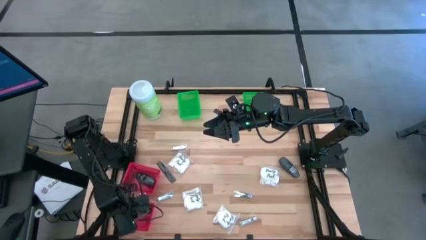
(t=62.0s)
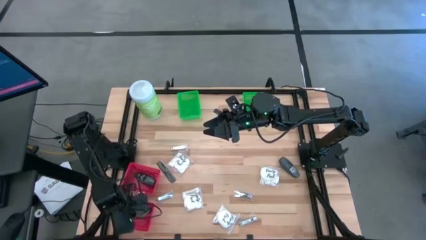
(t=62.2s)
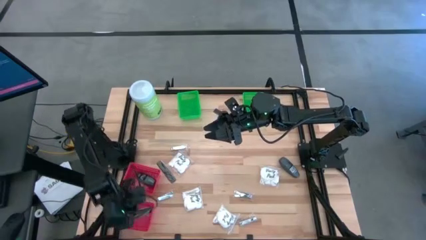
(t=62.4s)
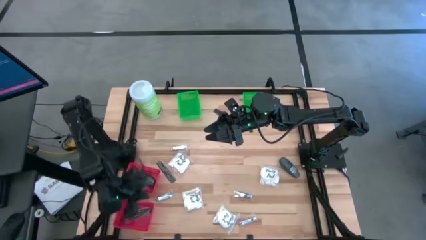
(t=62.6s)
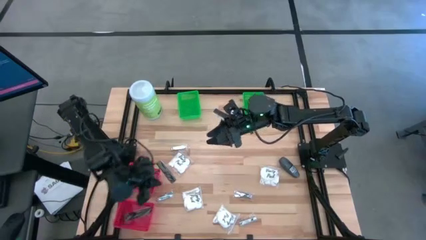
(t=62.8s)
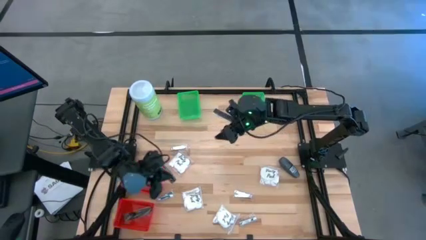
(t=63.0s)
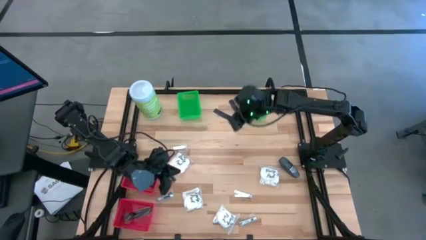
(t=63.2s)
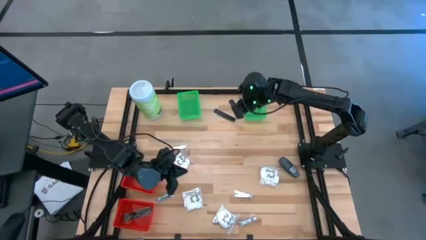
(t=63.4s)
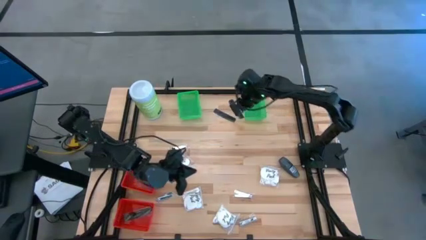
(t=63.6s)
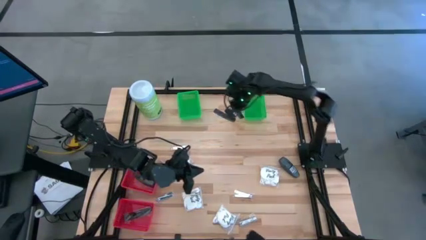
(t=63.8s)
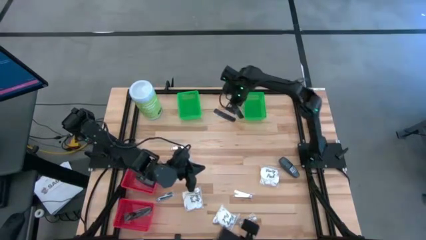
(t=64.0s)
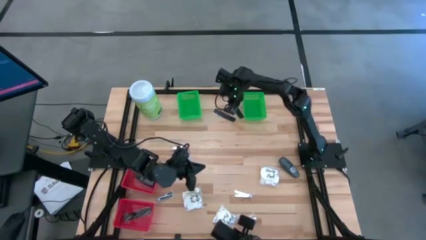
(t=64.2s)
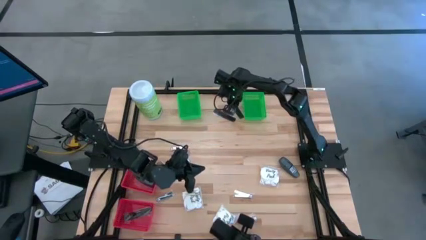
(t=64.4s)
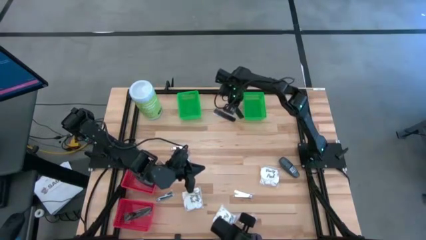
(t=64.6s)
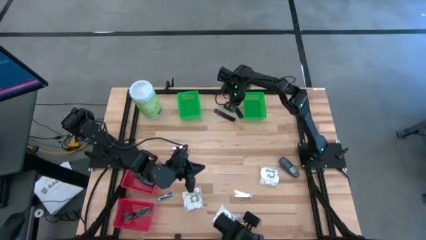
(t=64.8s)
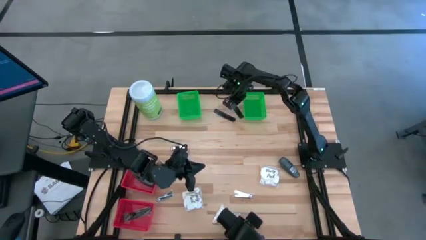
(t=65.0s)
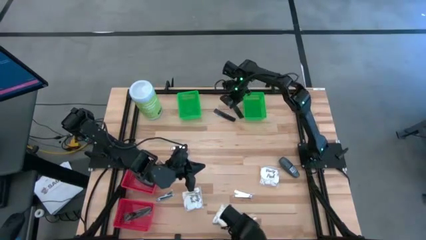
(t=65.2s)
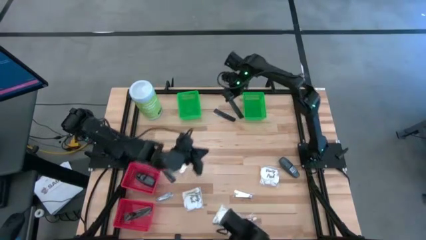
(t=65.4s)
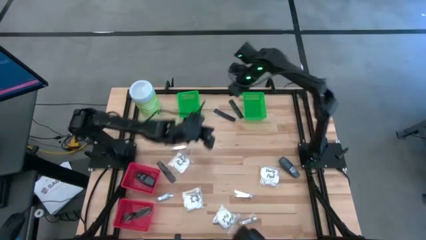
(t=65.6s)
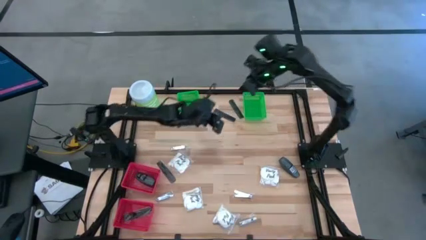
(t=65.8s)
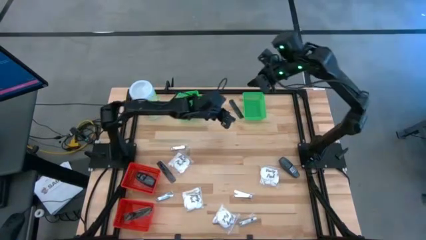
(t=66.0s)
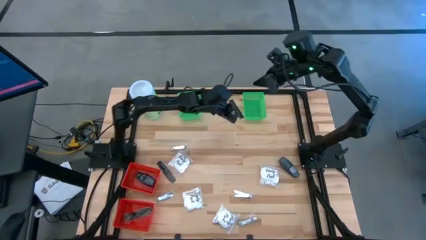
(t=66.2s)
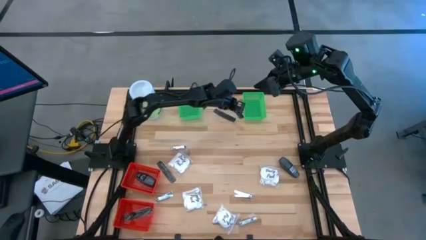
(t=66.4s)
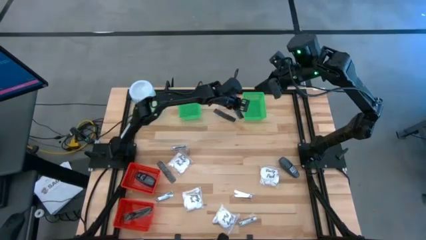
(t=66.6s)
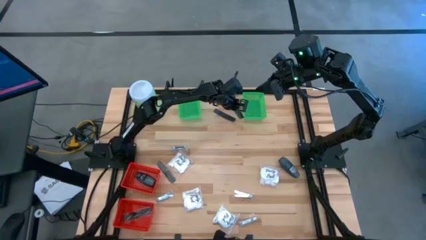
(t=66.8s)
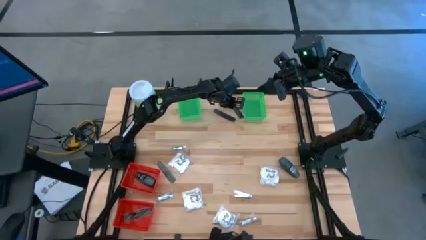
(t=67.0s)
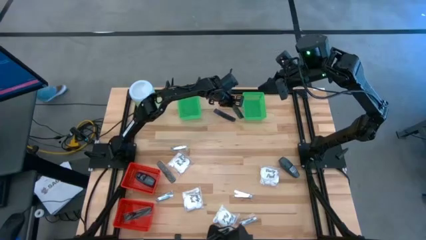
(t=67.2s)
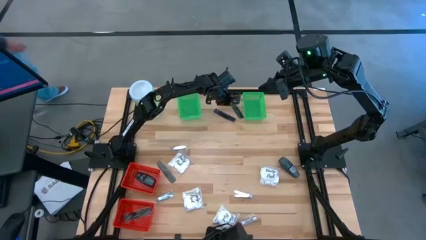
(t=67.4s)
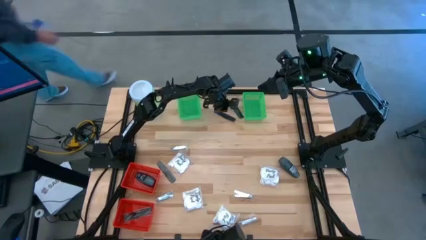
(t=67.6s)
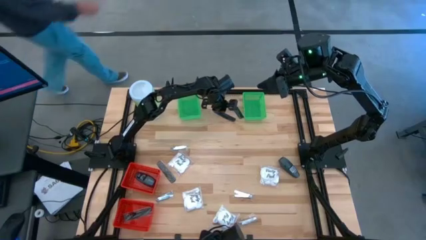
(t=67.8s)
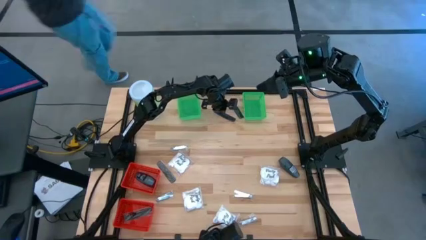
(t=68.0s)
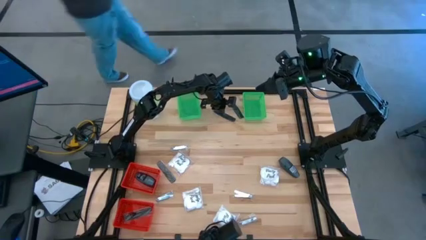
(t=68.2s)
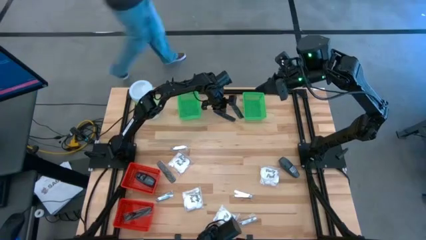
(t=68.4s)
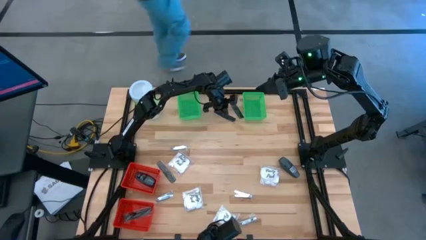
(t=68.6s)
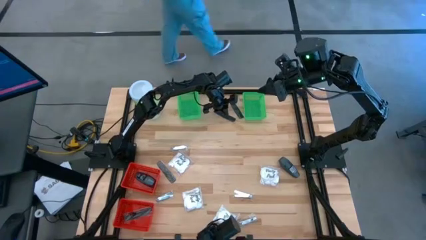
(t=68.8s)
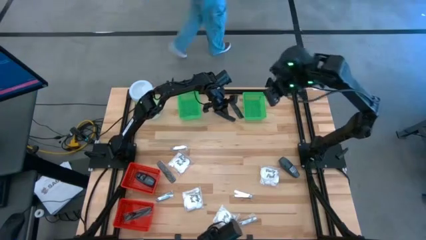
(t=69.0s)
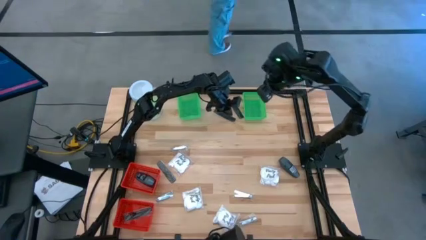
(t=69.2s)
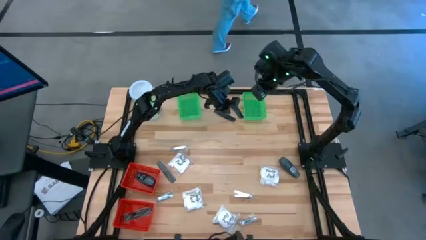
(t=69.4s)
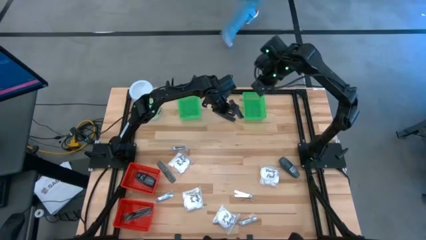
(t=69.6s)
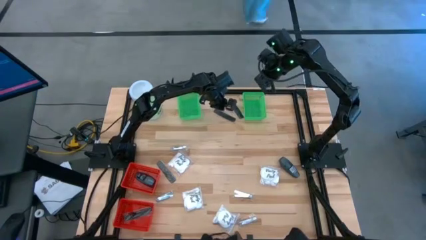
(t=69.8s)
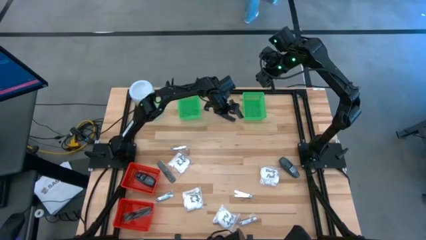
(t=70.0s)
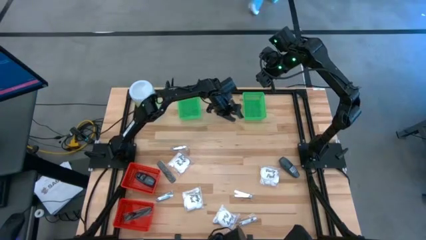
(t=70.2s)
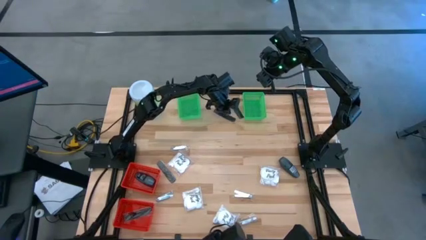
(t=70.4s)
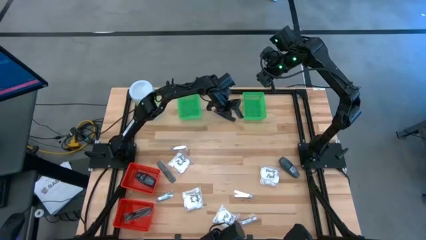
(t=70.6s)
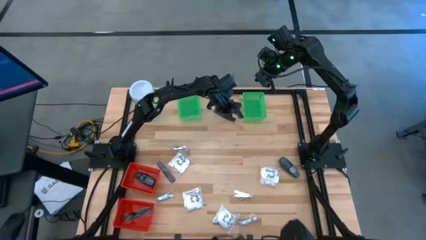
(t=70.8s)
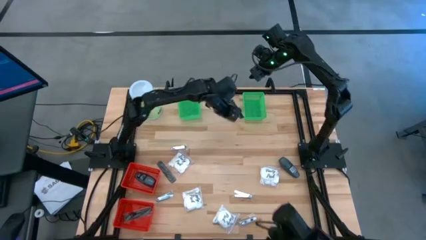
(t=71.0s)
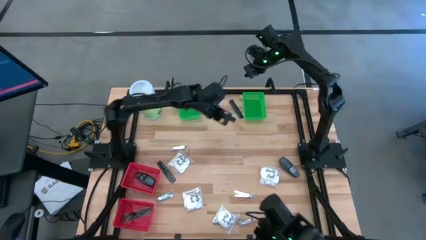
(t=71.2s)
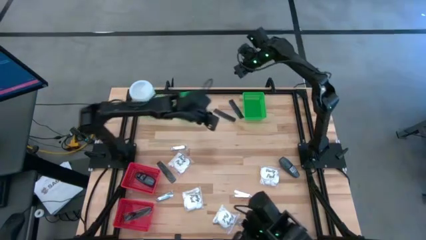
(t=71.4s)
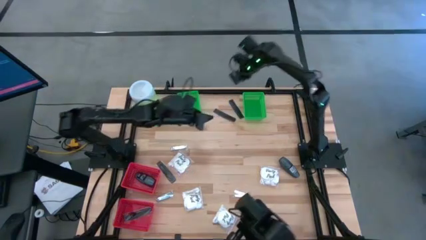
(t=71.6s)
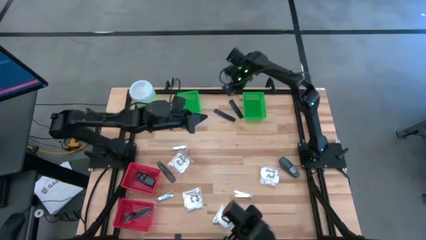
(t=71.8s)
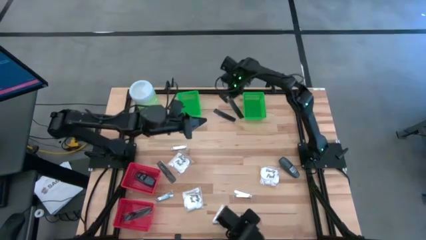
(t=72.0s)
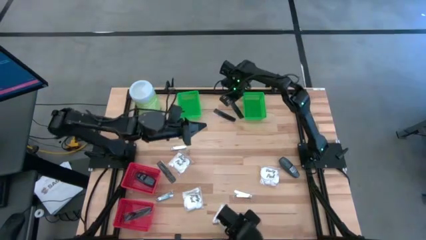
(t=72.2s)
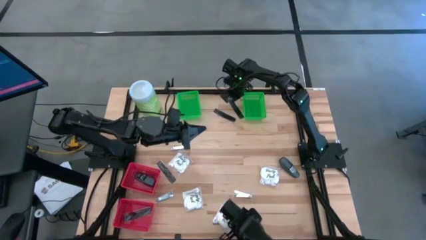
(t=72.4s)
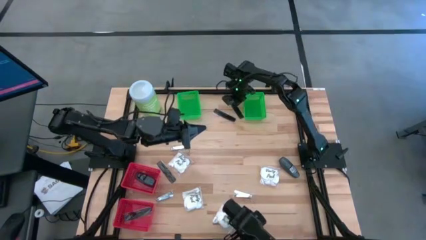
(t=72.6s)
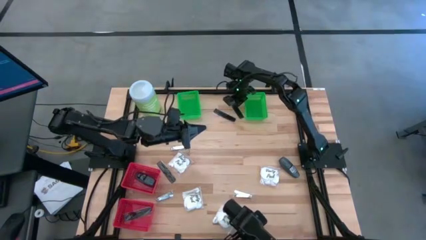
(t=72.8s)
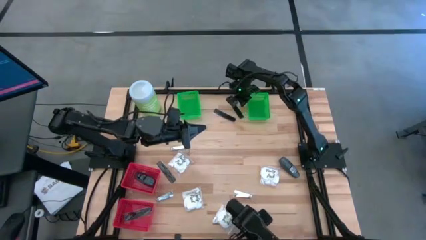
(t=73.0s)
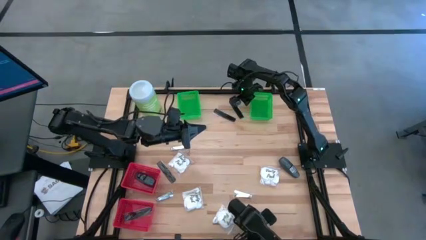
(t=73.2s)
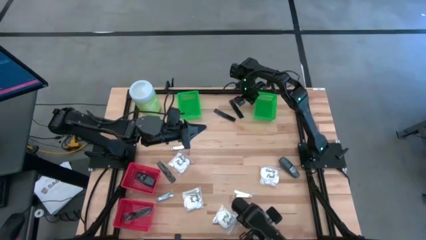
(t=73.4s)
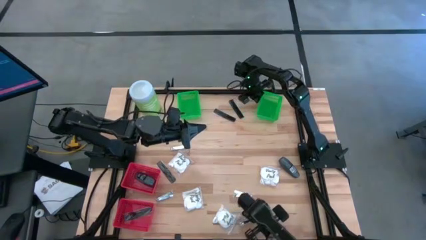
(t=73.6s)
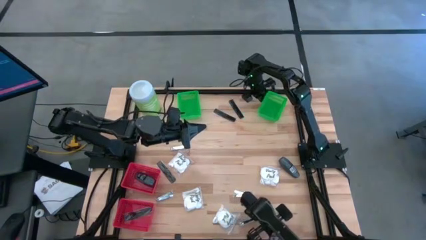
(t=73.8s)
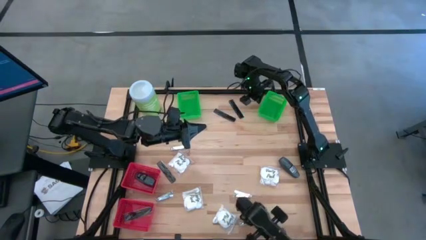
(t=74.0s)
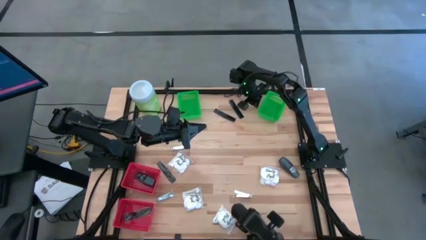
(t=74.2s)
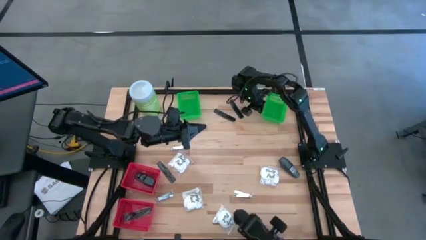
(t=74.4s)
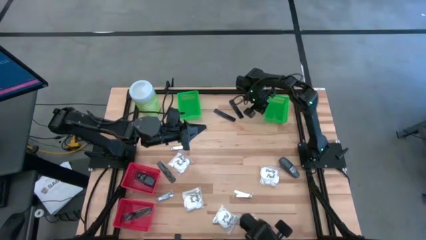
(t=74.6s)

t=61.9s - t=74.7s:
Task: Pick & Place Travel size toiletries
Adjust the top right green basket

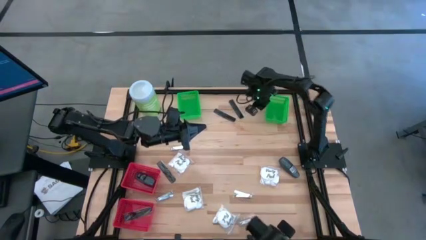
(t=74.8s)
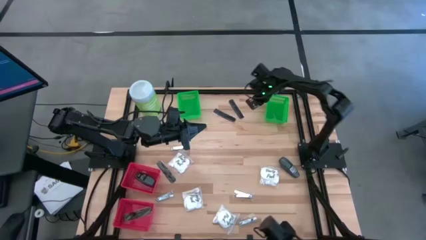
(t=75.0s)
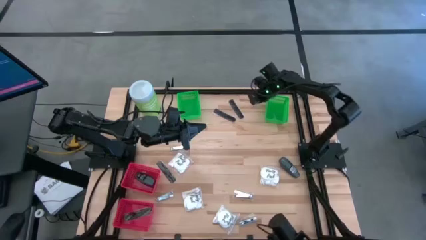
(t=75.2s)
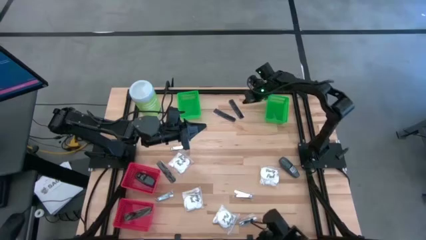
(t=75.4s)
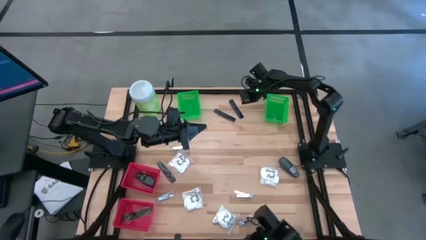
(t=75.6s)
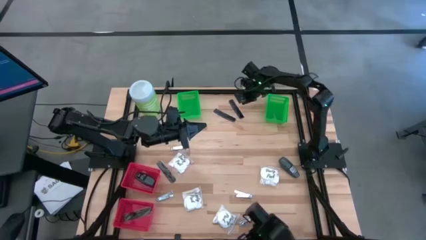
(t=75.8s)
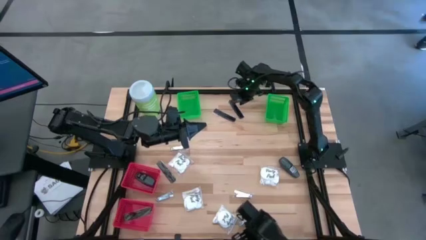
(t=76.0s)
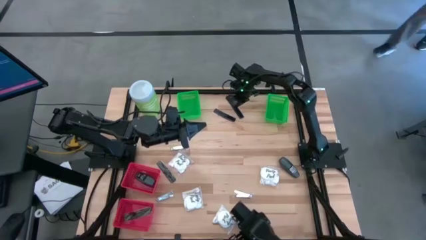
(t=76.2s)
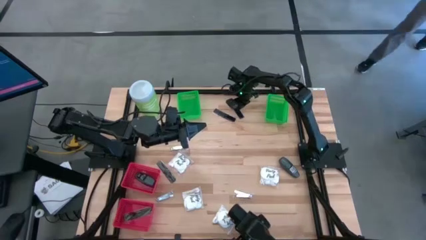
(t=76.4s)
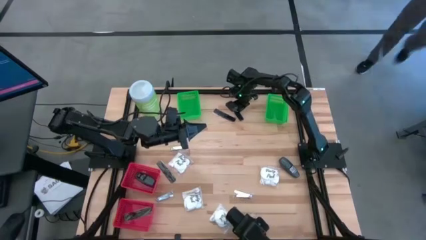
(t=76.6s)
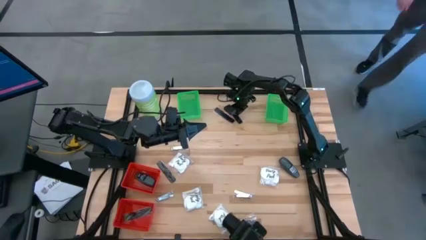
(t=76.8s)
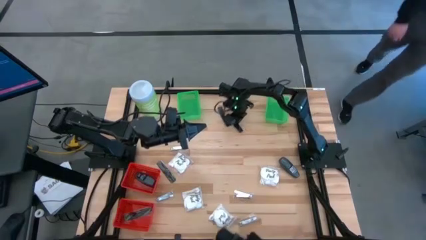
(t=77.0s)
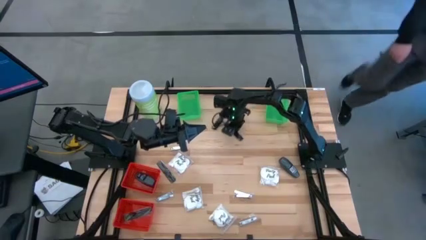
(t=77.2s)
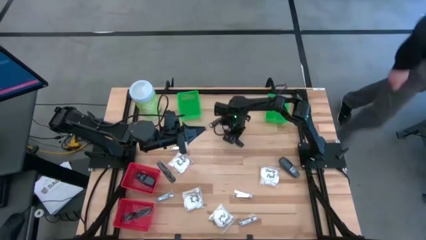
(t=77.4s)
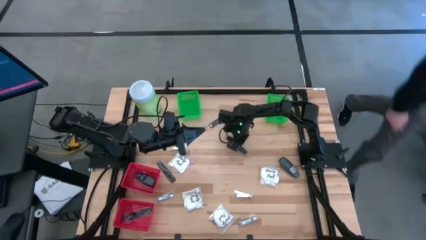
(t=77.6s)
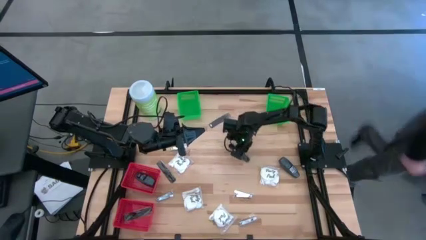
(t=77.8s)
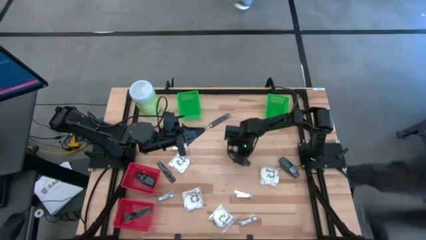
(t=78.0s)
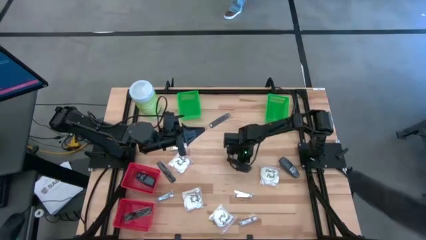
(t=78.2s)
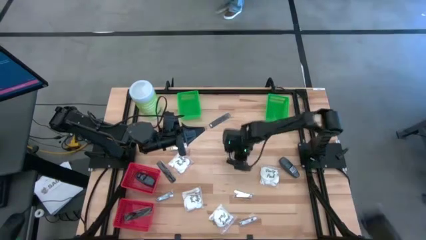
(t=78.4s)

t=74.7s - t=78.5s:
Move the black comb to the center of the table
